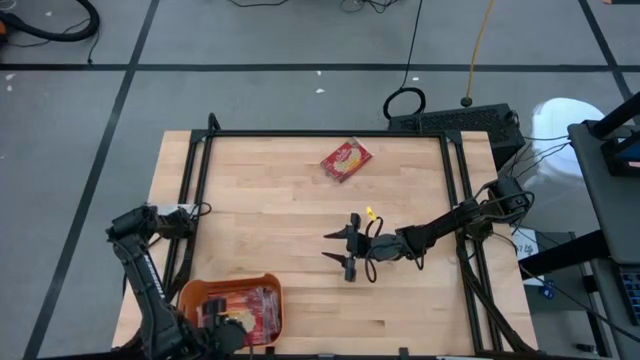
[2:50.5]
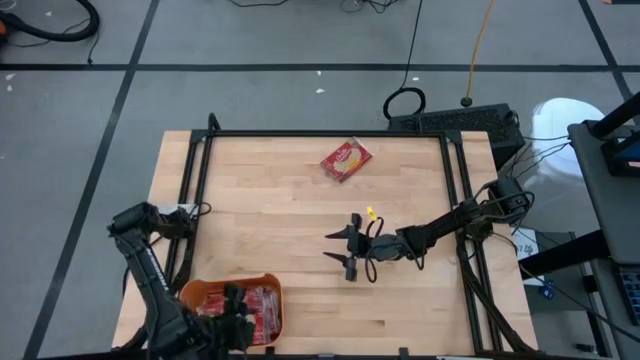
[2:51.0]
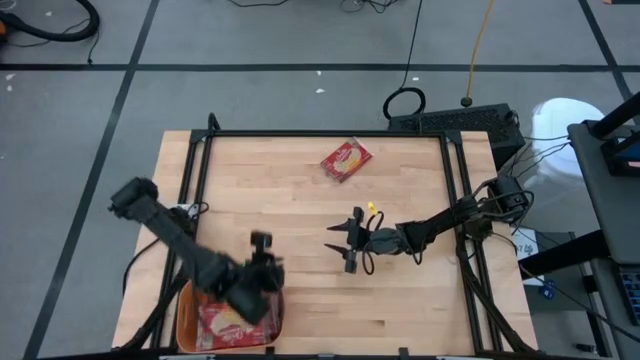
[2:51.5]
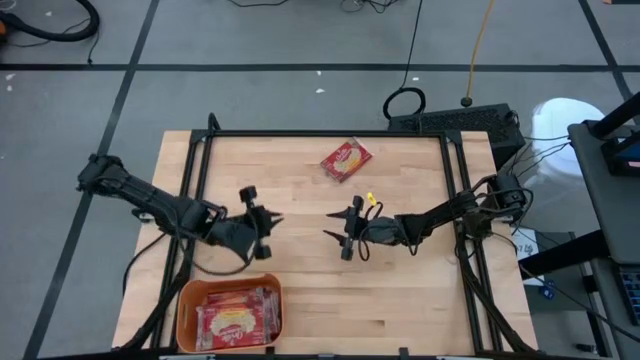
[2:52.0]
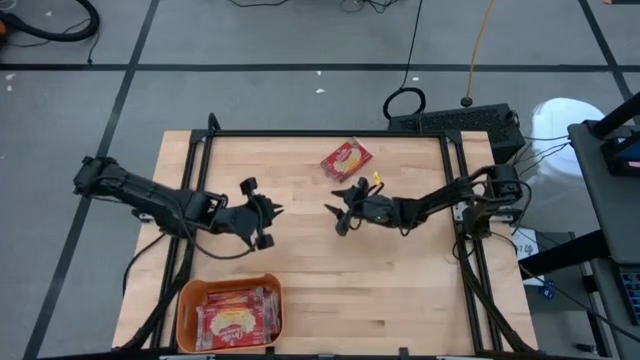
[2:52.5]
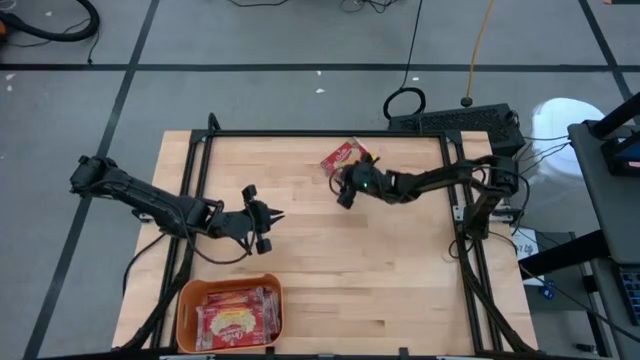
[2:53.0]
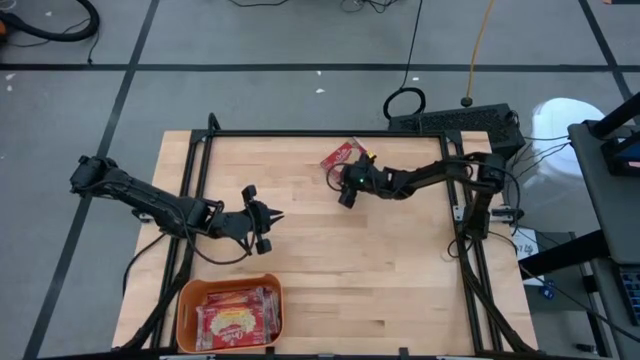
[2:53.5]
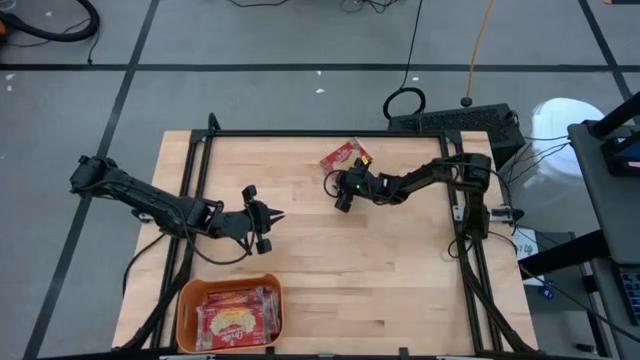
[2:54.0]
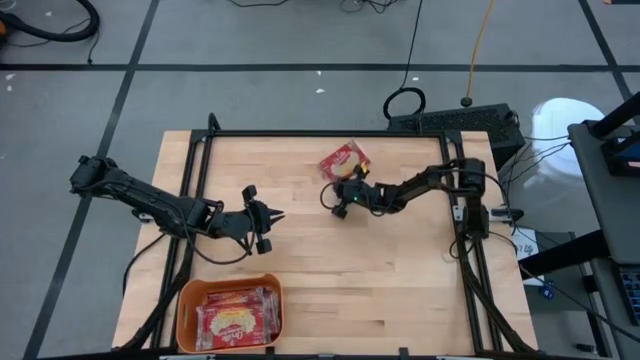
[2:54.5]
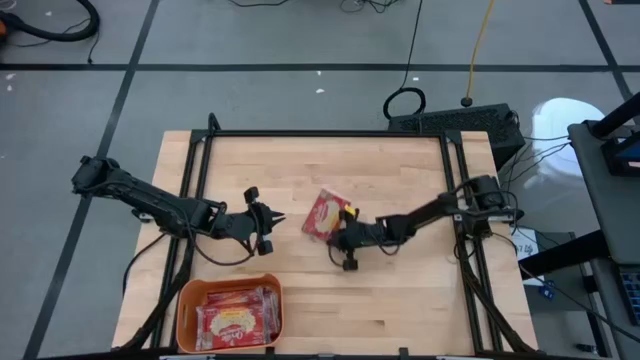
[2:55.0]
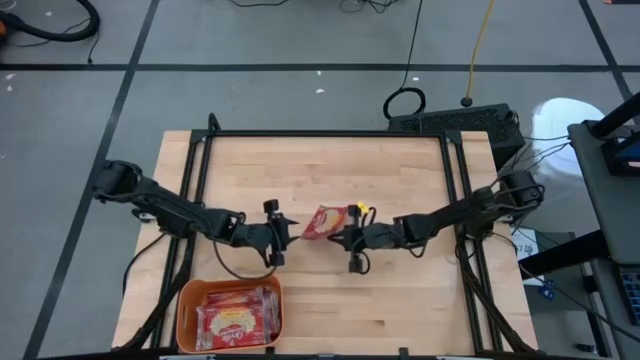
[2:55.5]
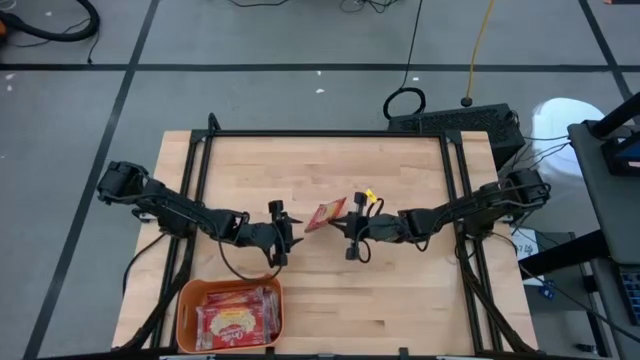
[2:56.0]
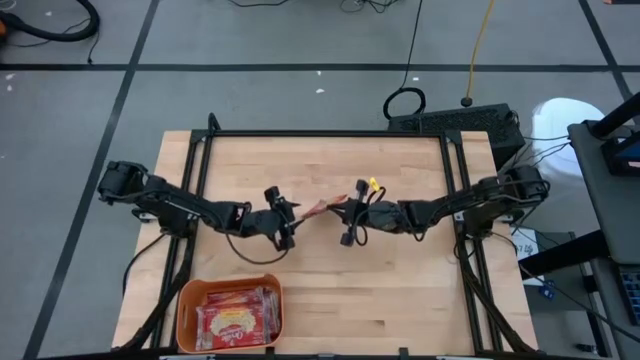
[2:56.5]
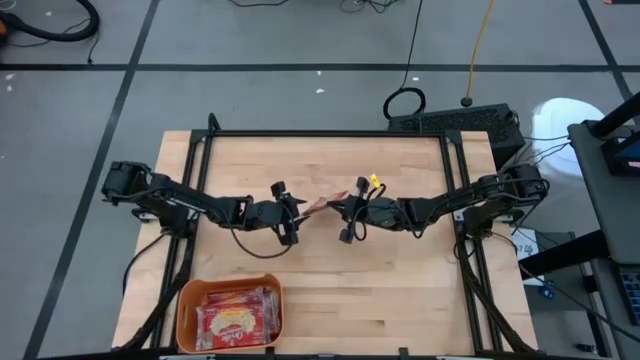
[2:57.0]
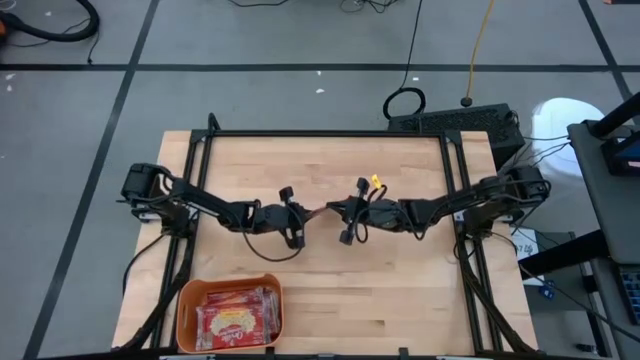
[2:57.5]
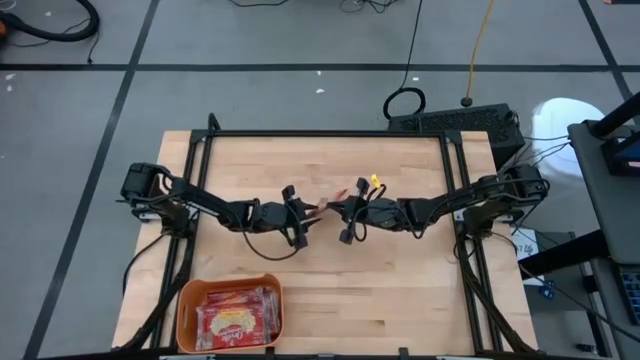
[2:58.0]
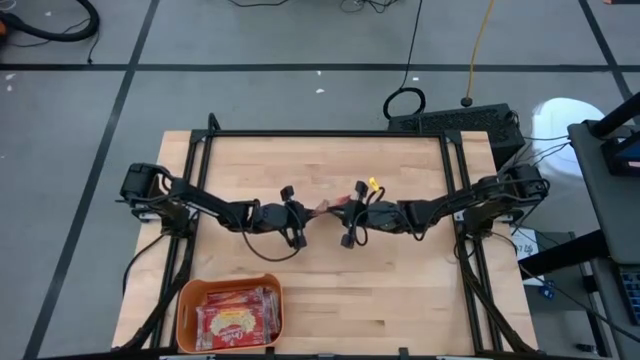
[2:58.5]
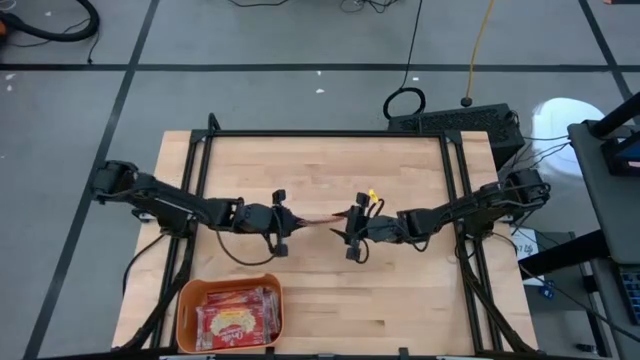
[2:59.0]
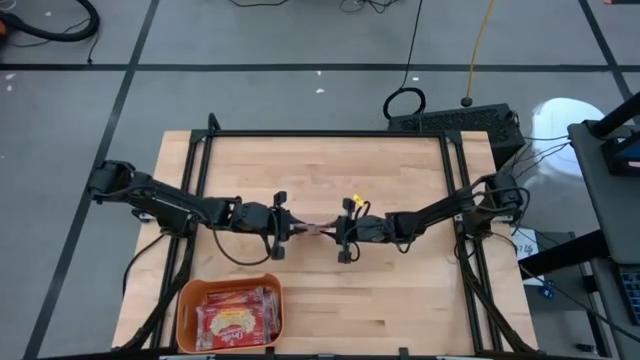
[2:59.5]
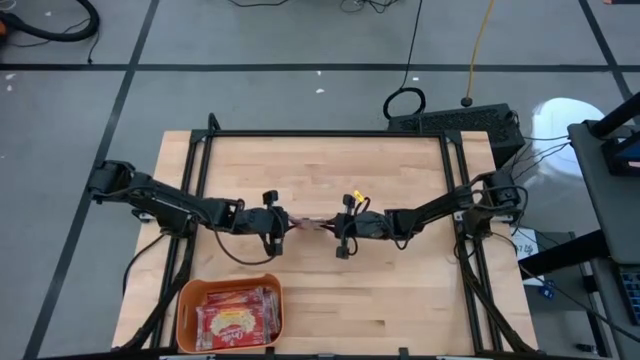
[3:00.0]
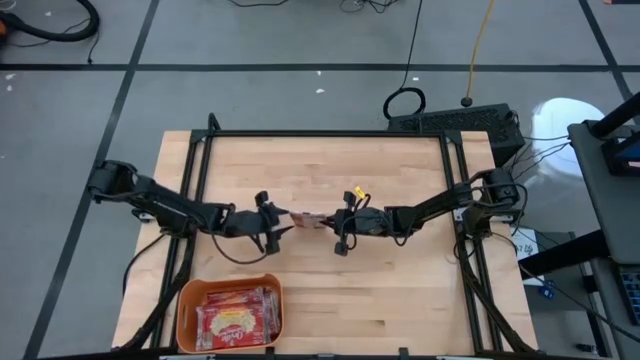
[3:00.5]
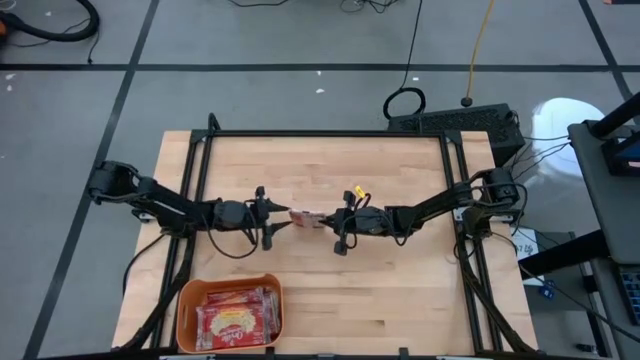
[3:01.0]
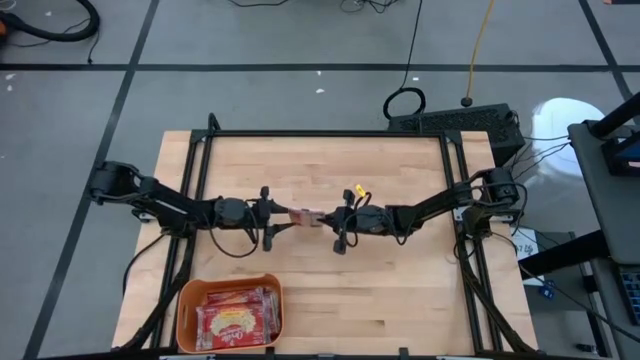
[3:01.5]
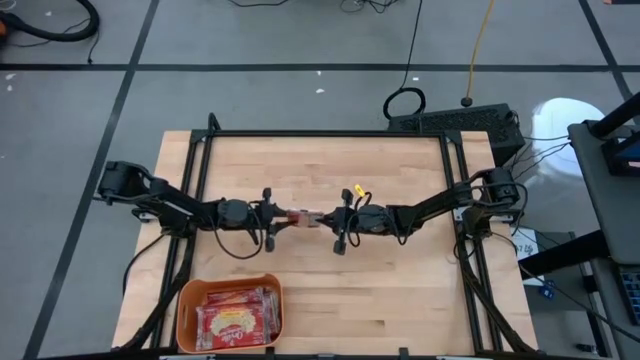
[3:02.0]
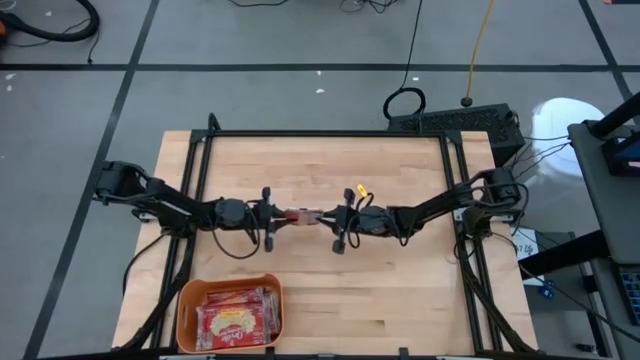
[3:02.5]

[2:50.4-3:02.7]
Task: Sort popcorn bags into baskets
Put the popcorn bag into the orange bin

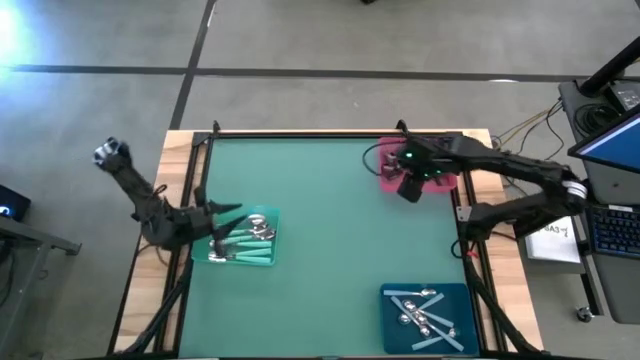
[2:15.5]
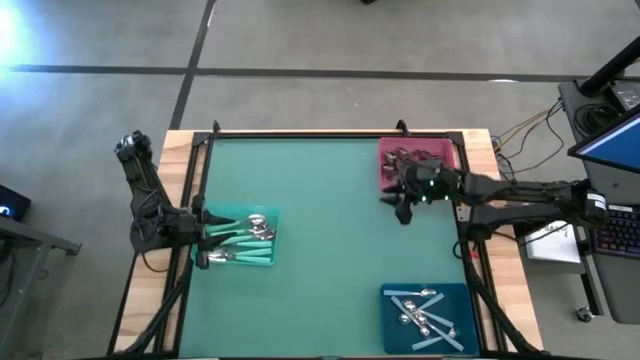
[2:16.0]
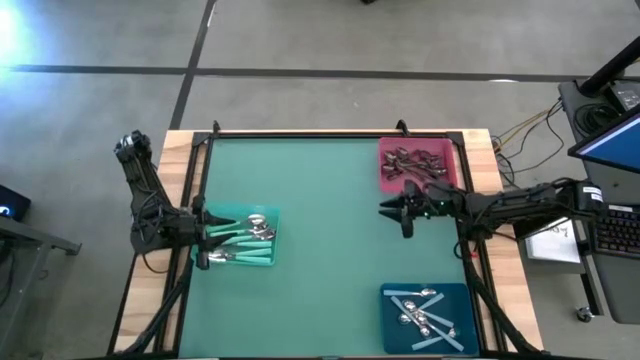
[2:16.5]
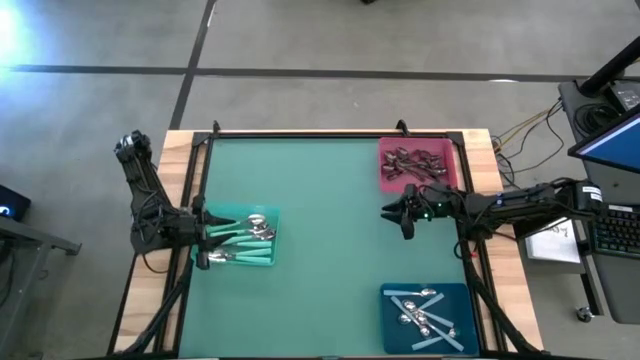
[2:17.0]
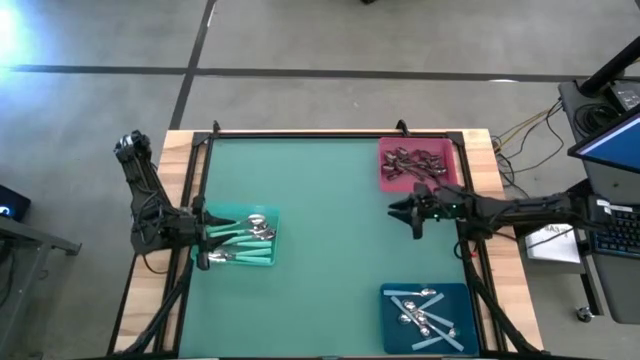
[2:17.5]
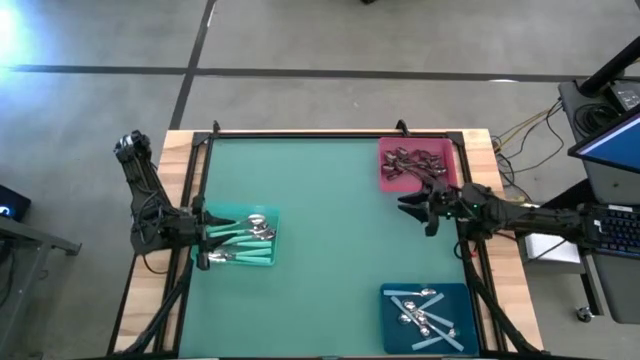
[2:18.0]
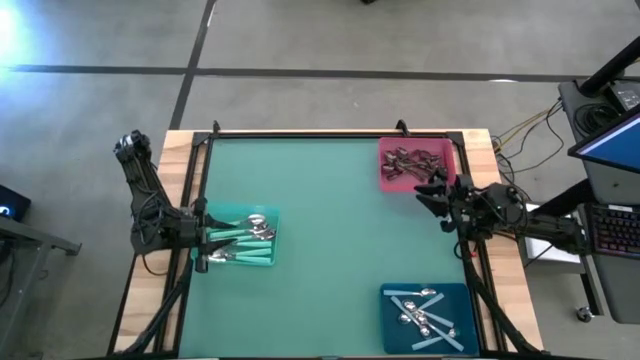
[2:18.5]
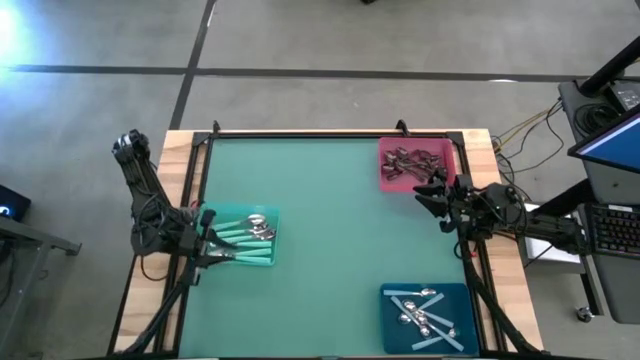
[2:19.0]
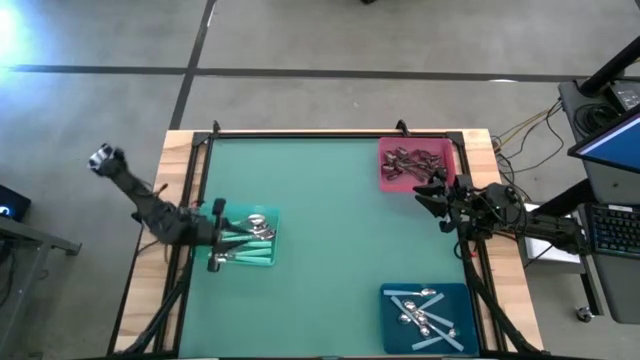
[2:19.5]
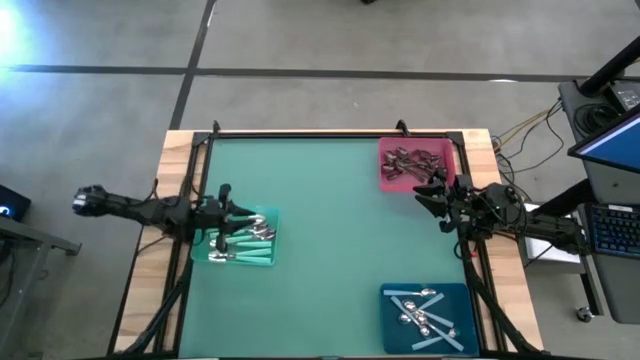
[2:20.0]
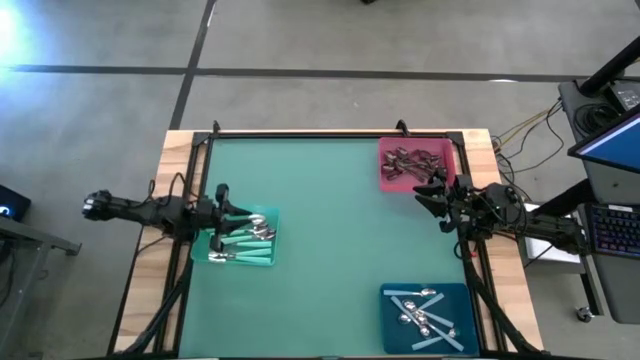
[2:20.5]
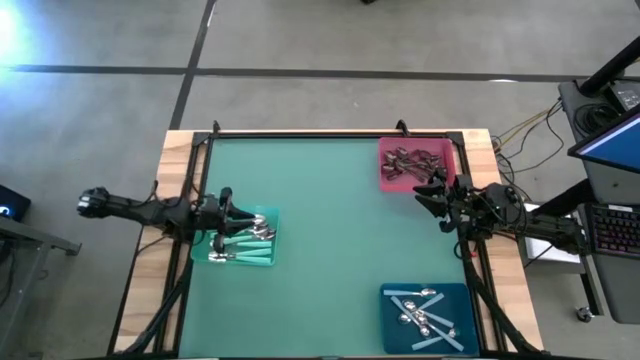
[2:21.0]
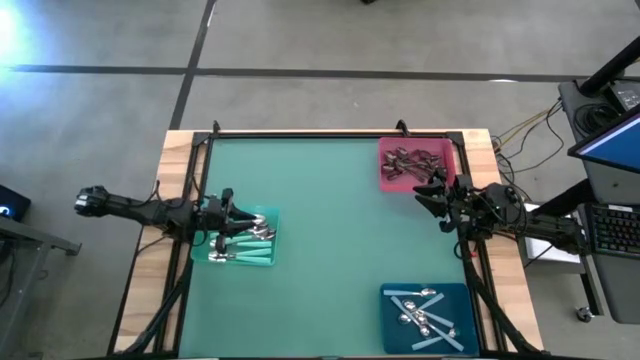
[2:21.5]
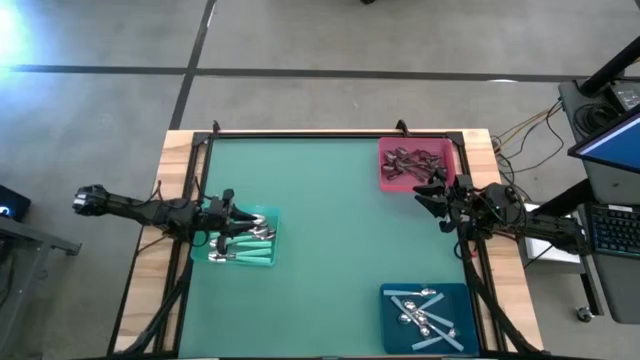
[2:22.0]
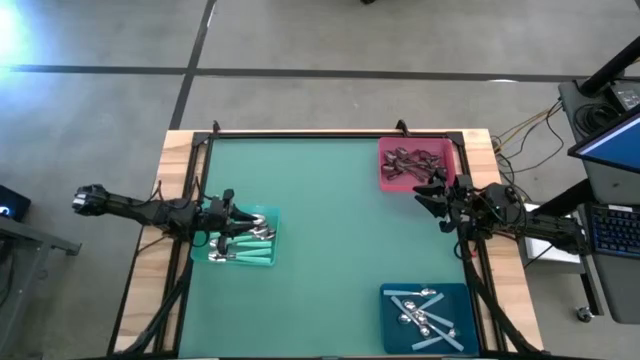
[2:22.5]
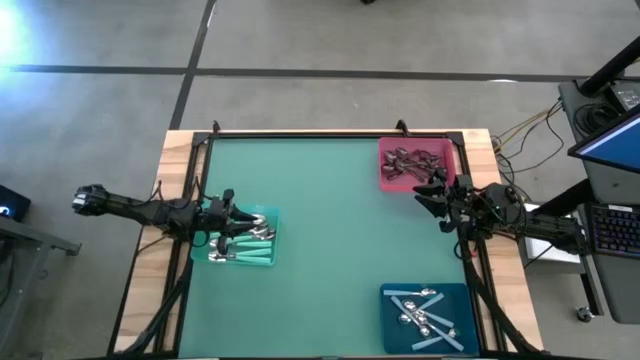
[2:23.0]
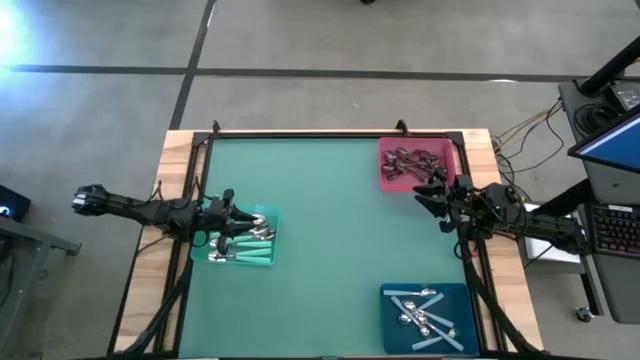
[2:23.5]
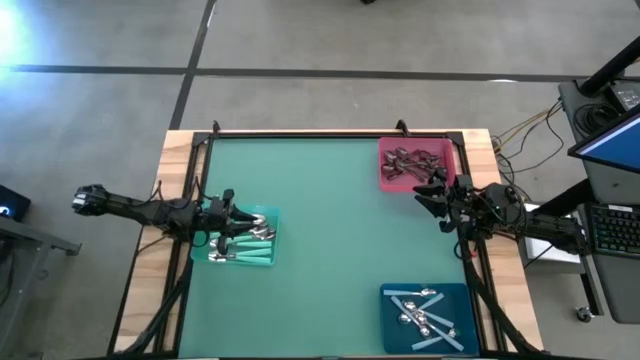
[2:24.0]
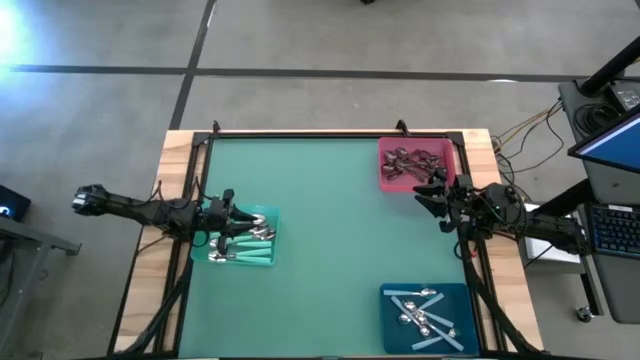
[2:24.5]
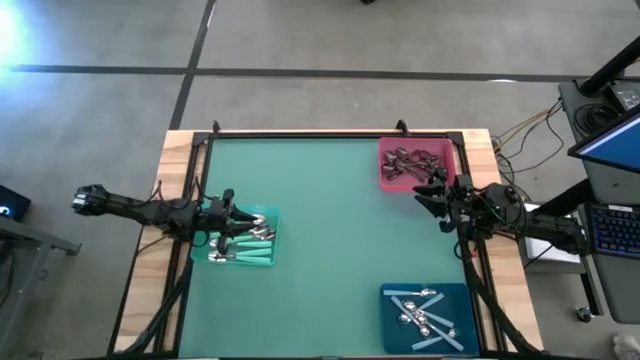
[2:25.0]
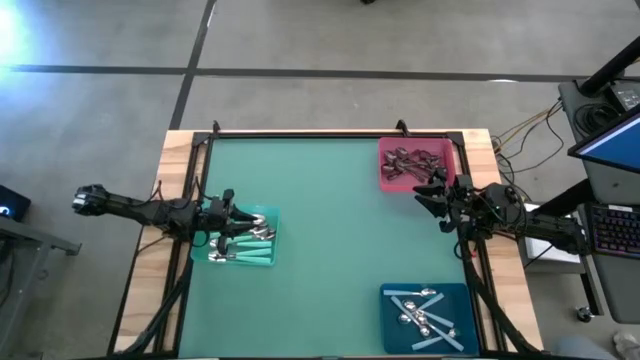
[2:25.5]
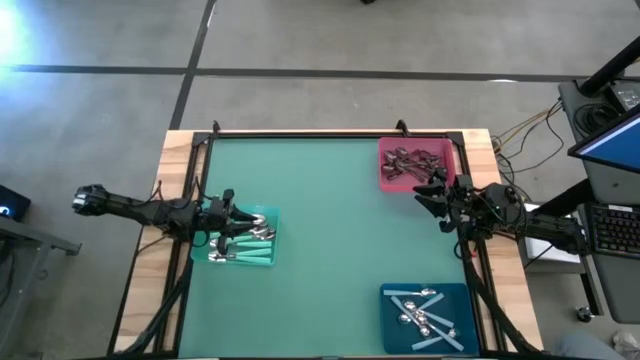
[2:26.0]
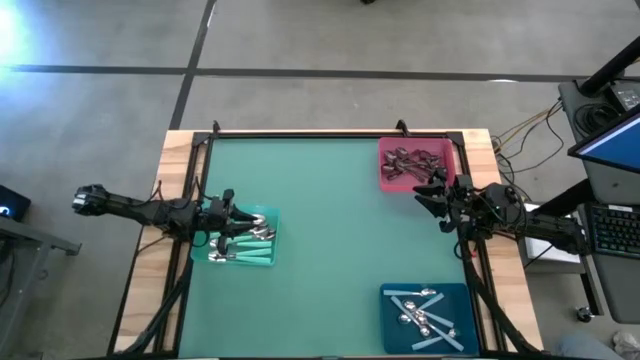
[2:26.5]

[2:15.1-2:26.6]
Task: Sort silverware by color (type)
Return to Home Position
